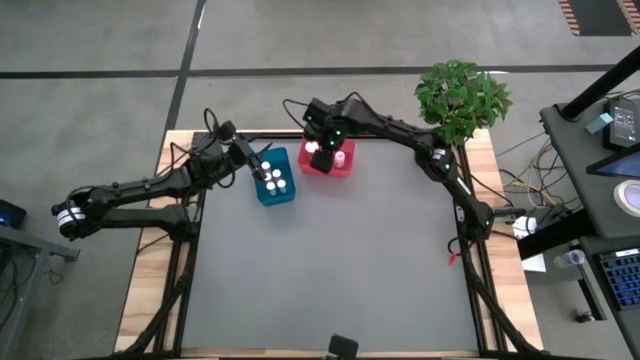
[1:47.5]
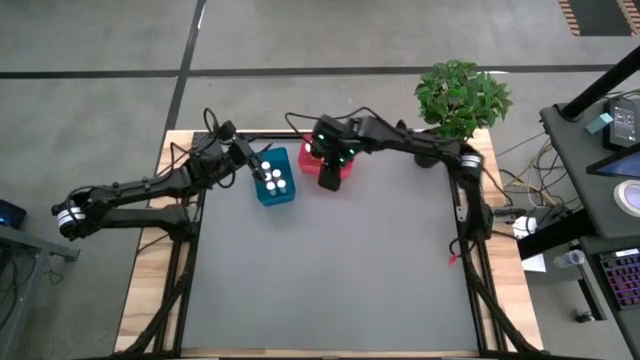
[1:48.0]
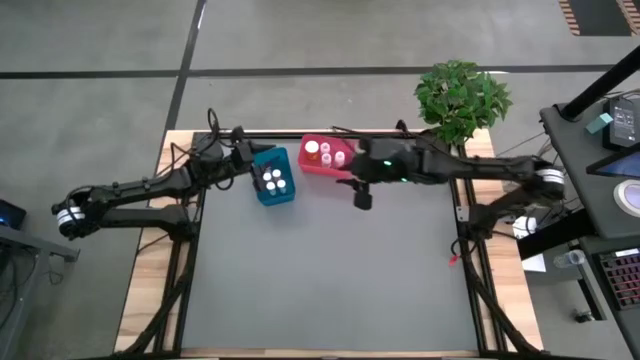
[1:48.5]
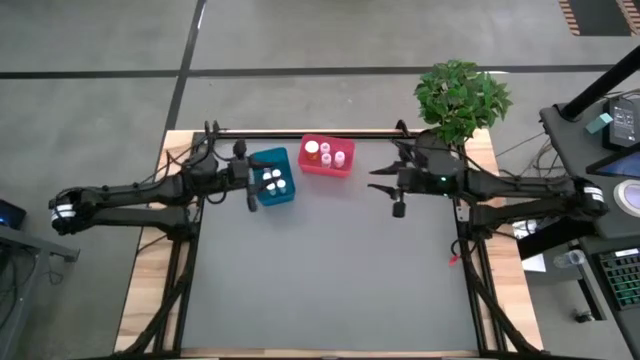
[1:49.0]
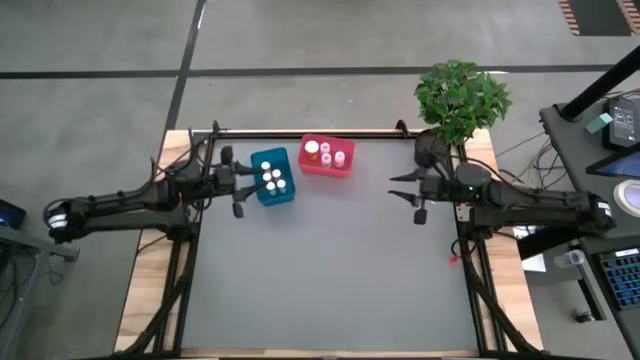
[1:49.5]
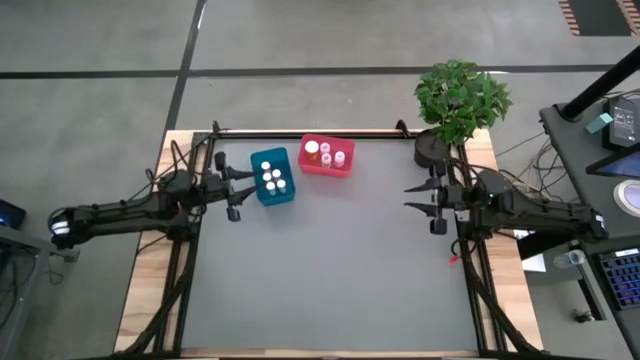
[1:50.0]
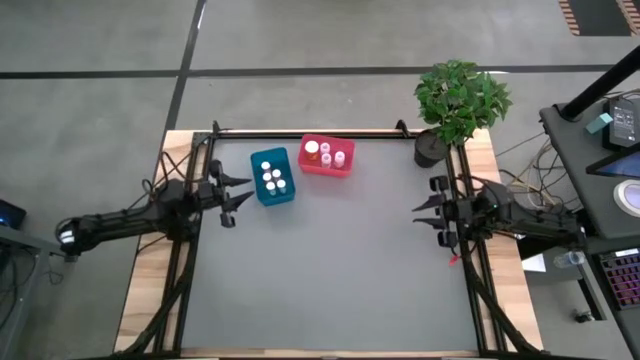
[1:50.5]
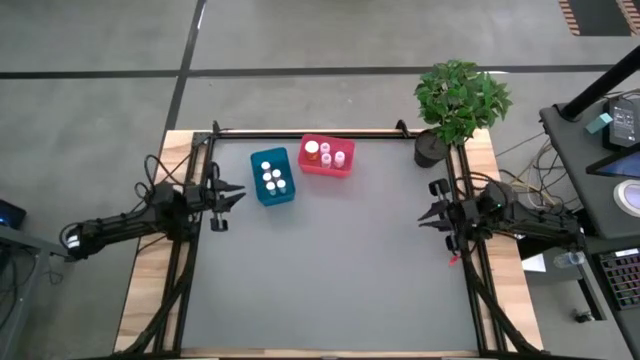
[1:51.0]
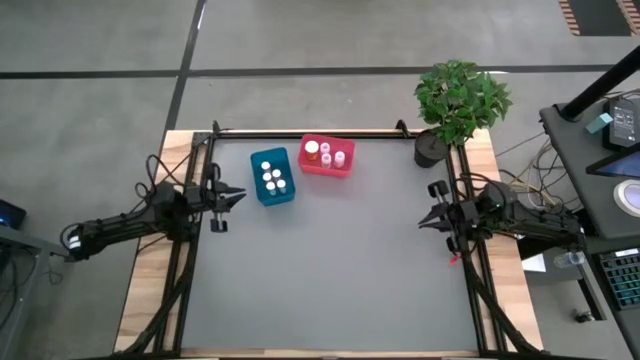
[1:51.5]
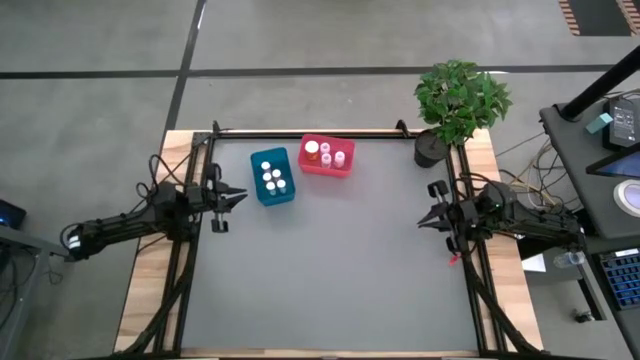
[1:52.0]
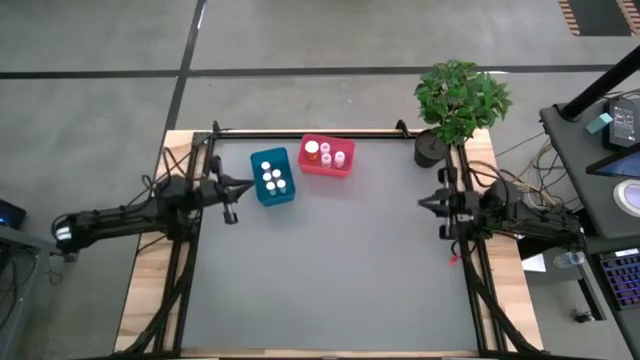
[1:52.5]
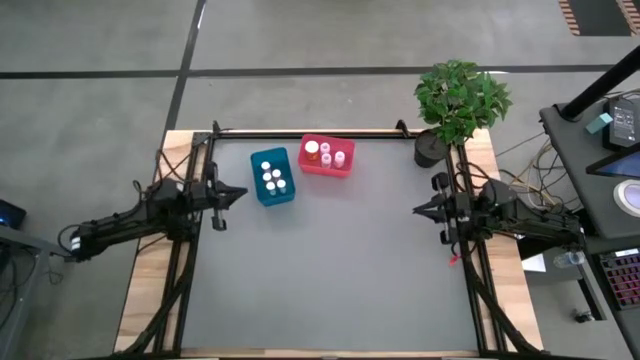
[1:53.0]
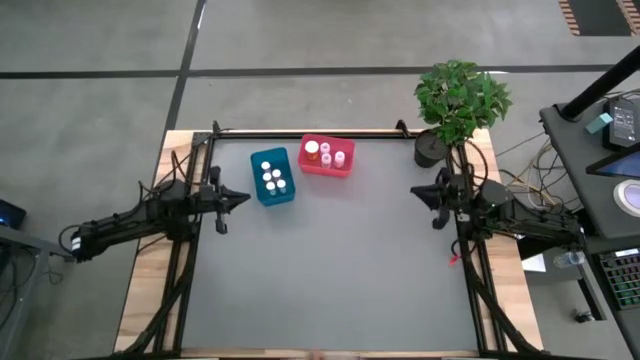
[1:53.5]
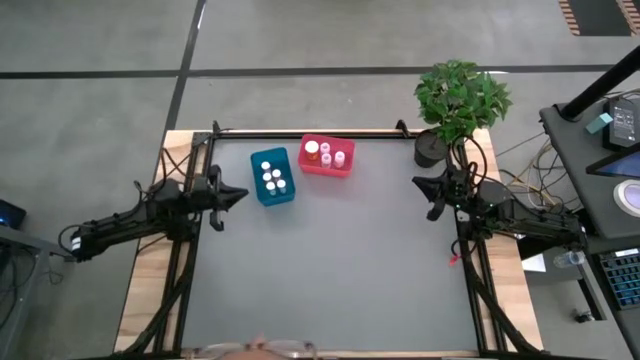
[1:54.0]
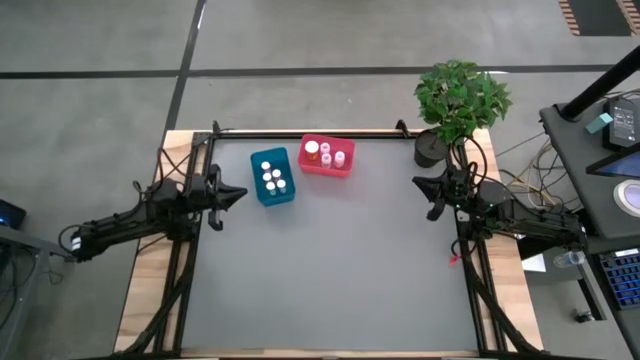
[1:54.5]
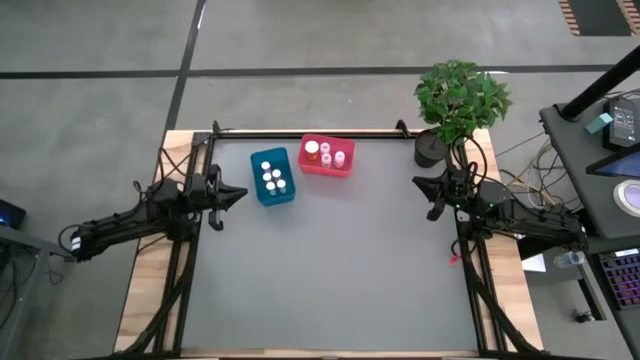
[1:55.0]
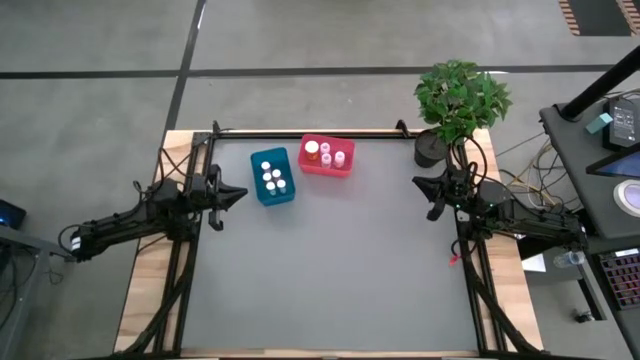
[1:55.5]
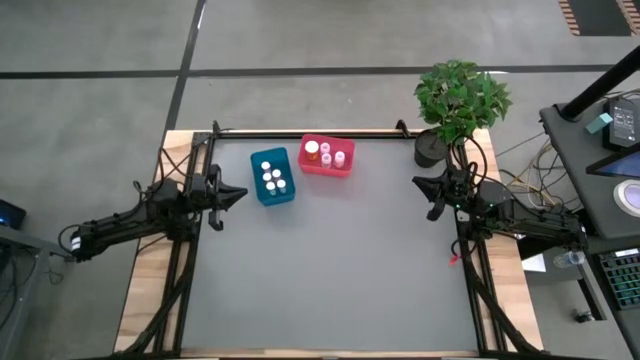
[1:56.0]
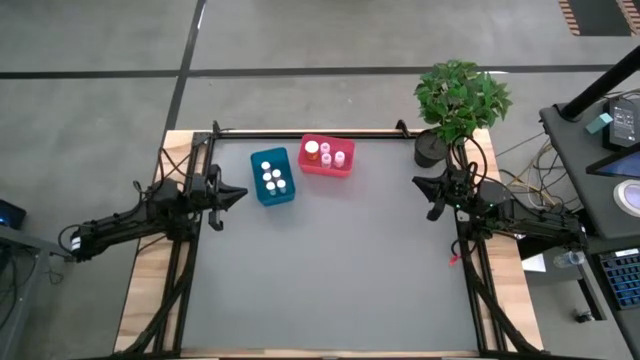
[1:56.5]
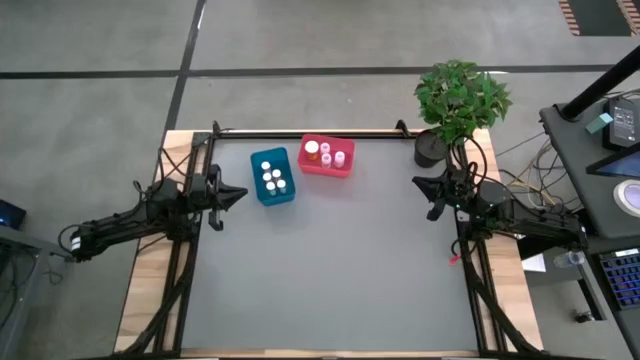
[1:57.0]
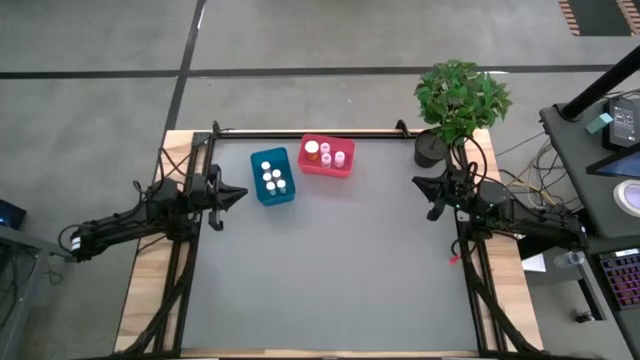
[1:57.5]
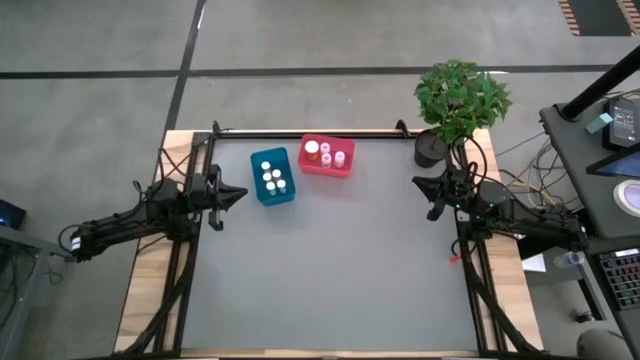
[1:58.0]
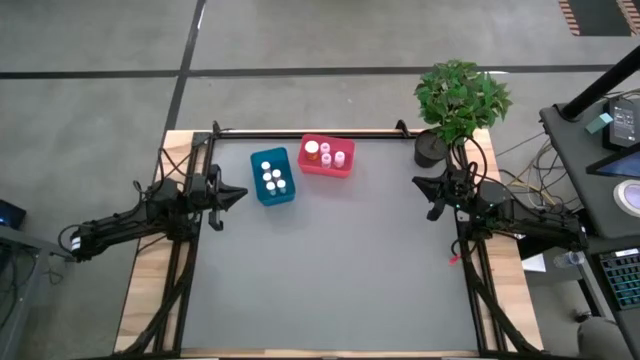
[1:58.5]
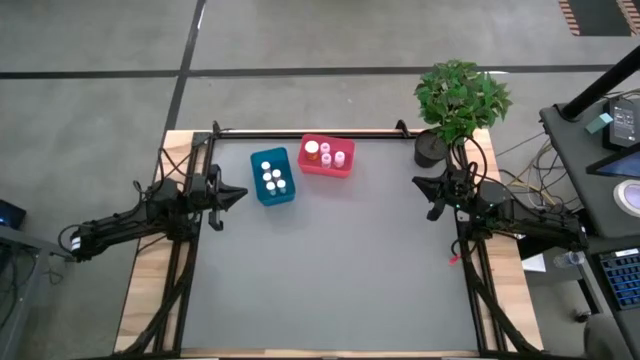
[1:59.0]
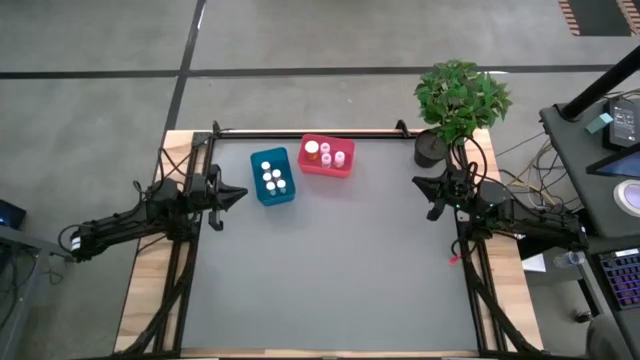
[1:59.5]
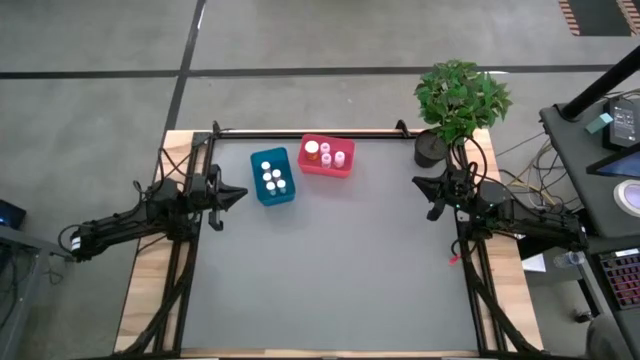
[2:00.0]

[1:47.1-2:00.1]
Task: Pick and place medicine bottles into bin by pill shape (circle, oval)
Return to Home Position

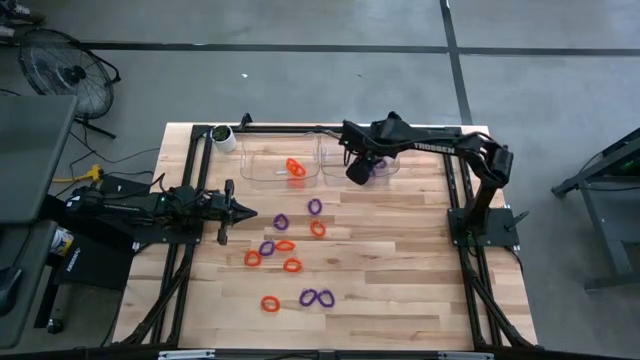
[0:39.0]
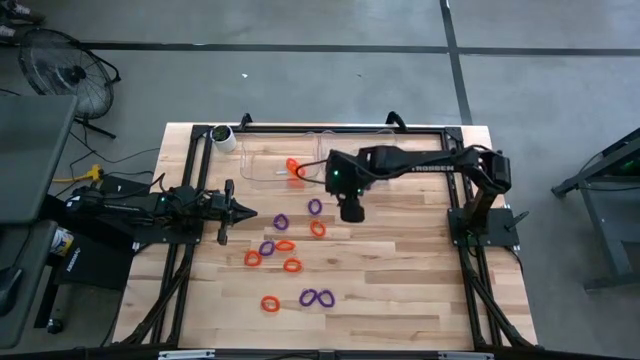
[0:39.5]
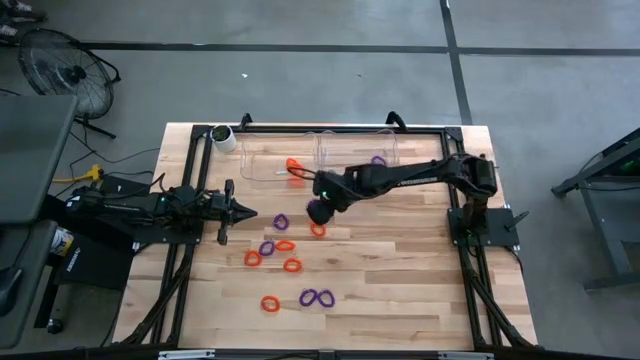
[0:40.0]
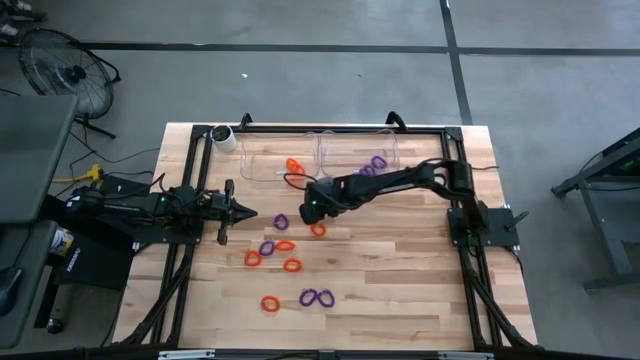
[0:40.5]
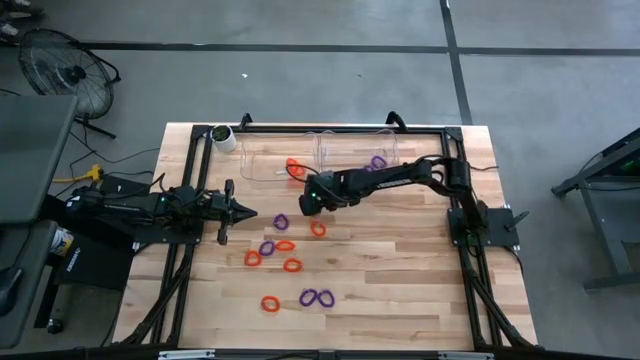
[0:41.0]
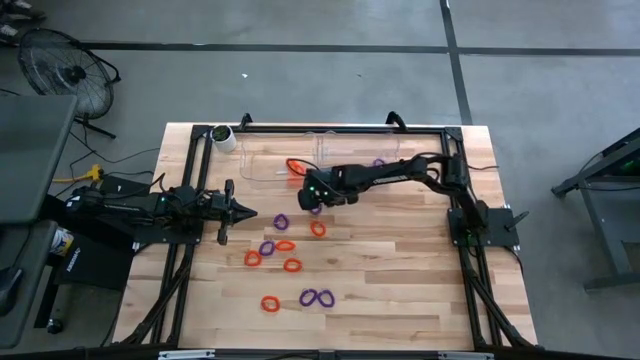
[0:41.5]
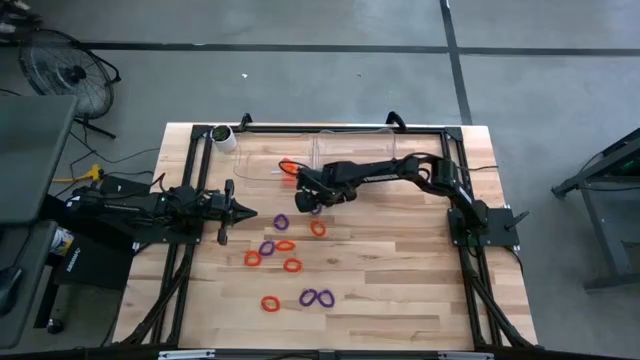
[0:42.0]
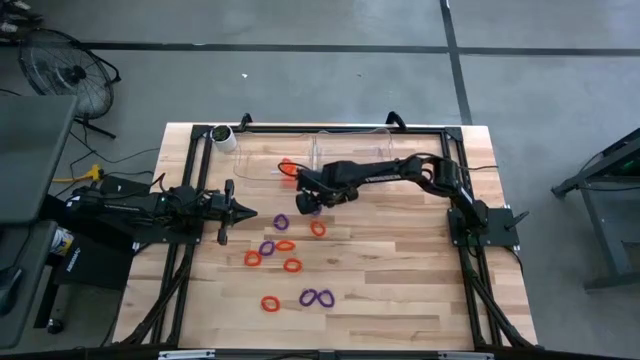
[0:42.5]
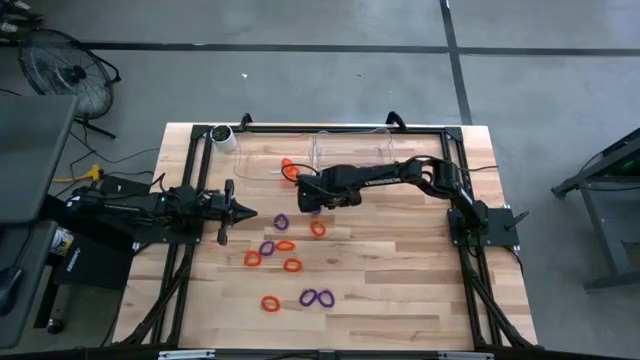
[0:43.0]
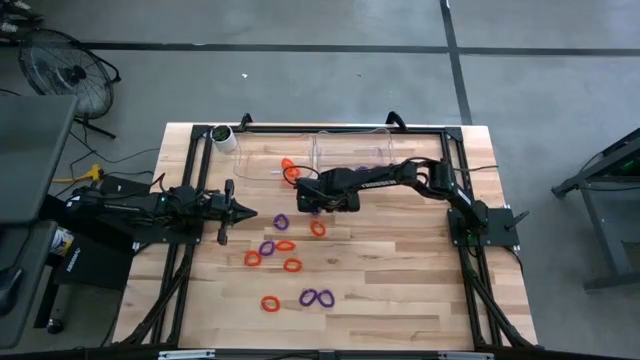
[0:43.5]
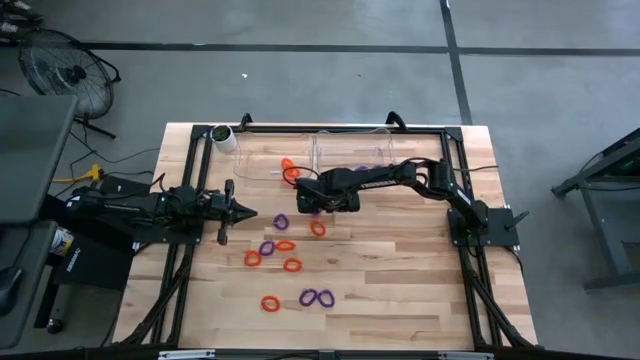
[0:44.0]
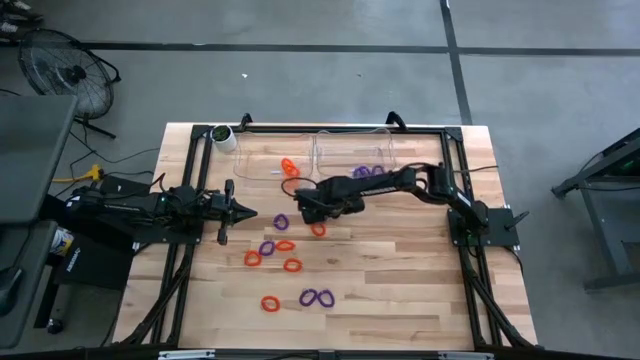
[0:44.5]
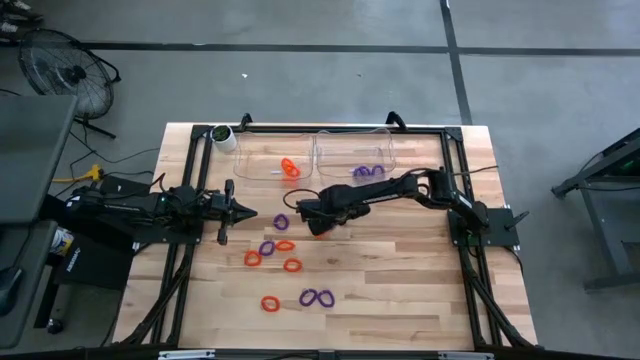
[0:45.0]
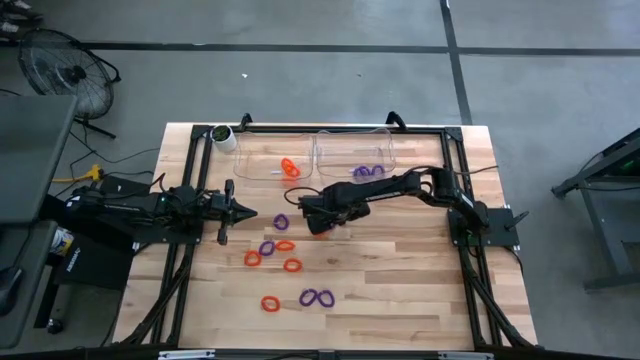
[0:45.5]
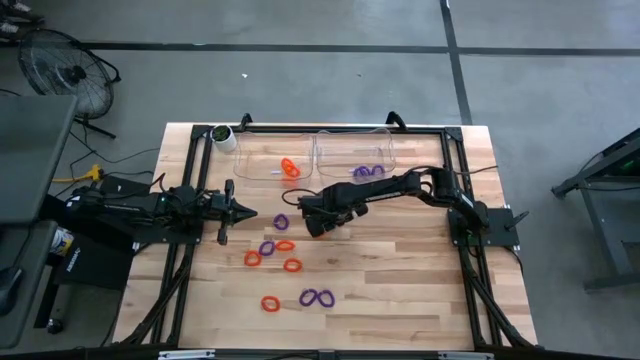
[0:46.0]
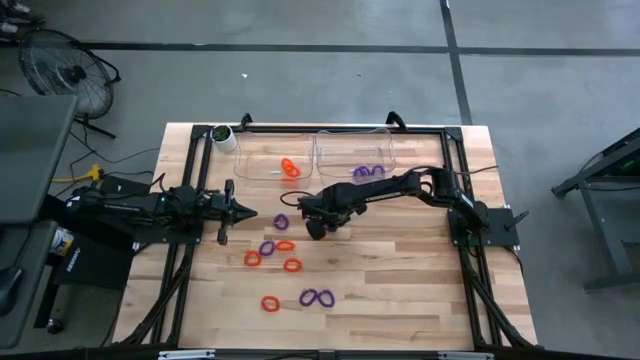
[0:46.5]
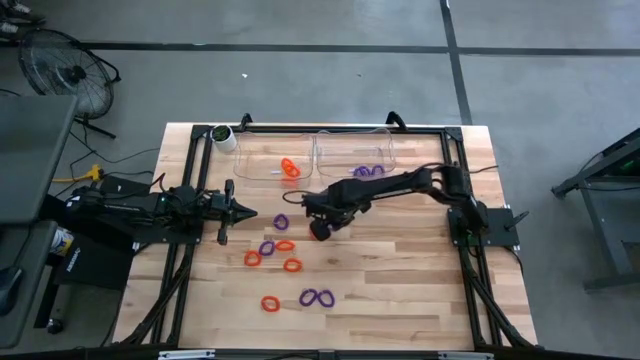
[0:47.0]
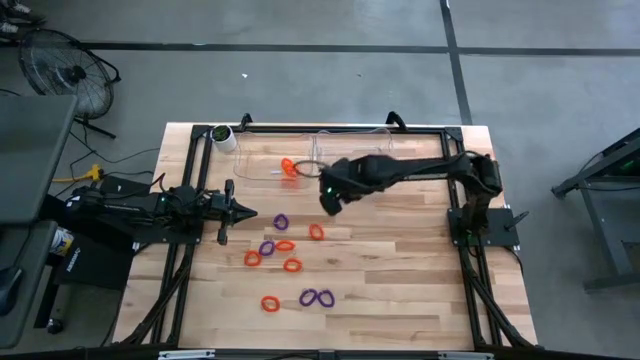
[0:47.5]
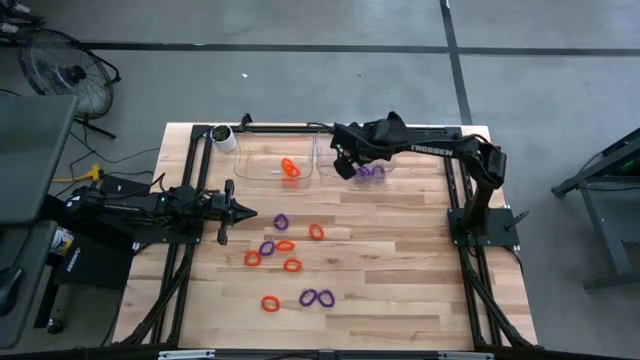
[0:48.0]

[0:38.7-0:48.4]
Task: Sort spring keychains
Put the violet spring keychain into the right bin
